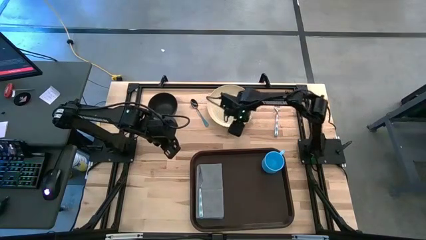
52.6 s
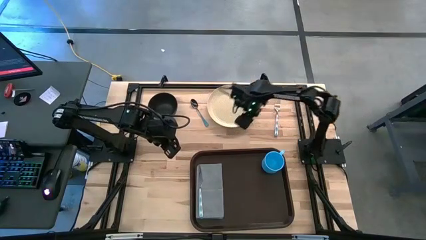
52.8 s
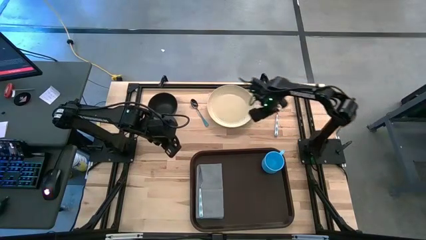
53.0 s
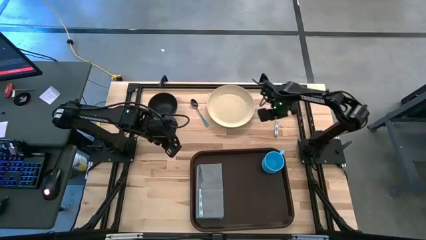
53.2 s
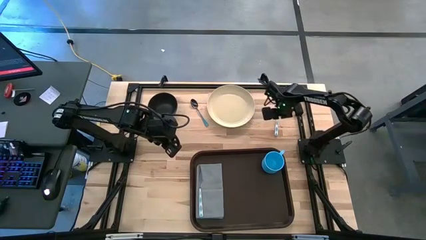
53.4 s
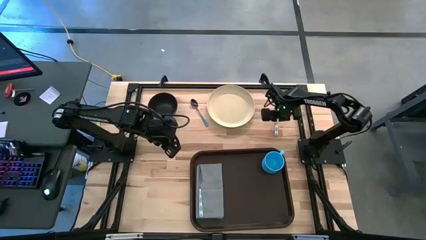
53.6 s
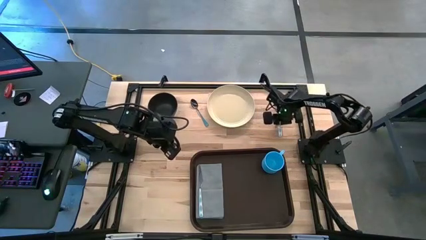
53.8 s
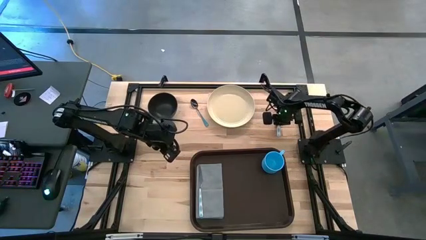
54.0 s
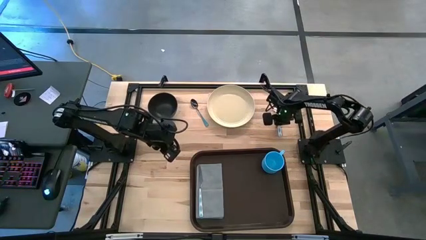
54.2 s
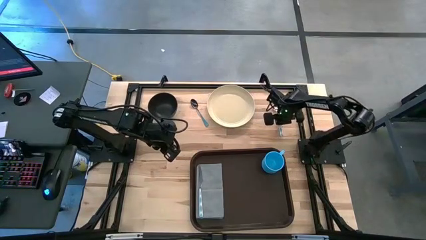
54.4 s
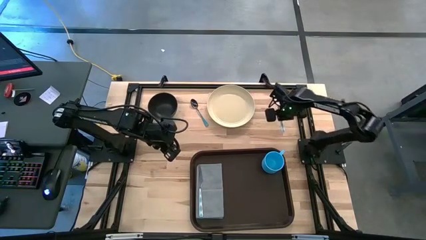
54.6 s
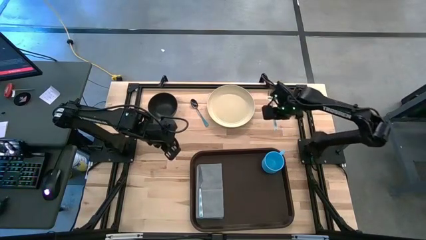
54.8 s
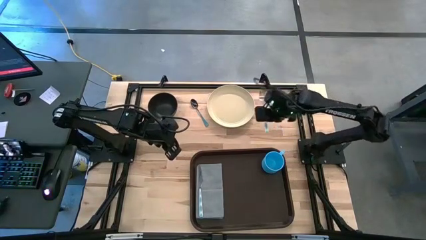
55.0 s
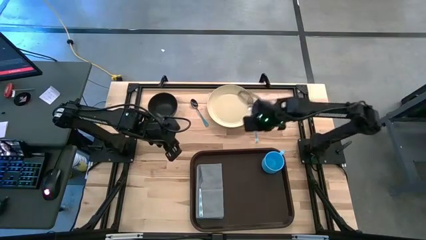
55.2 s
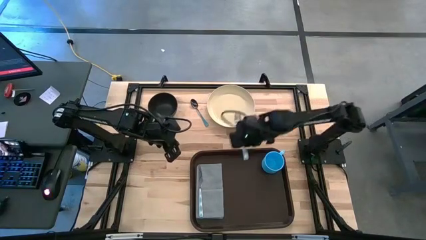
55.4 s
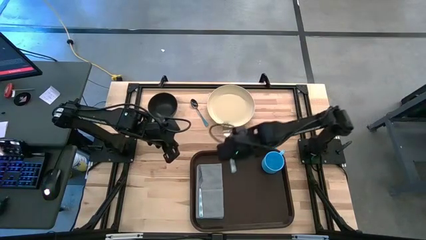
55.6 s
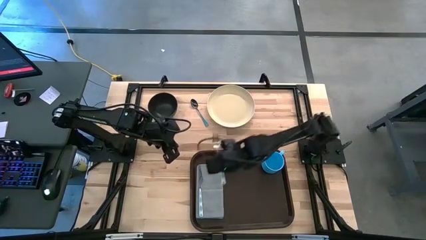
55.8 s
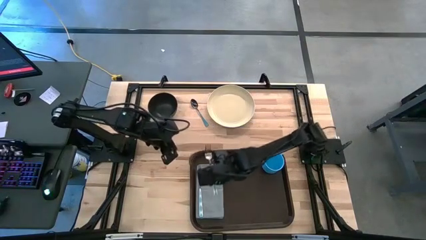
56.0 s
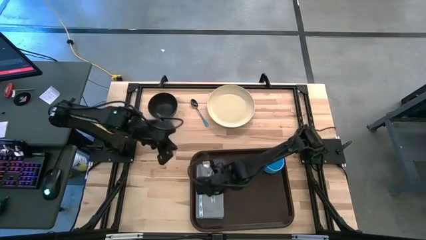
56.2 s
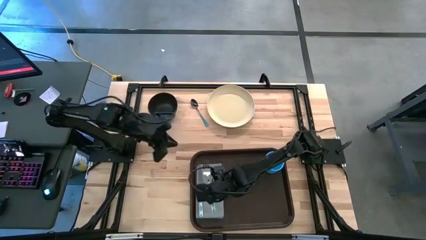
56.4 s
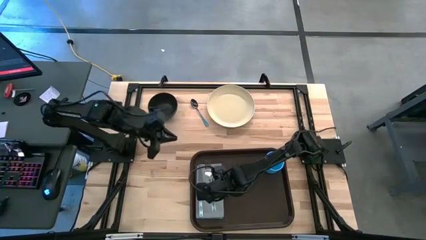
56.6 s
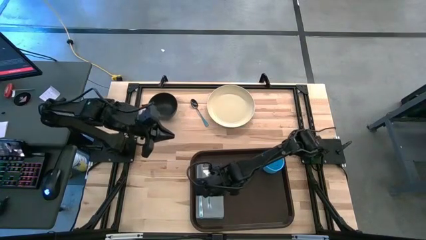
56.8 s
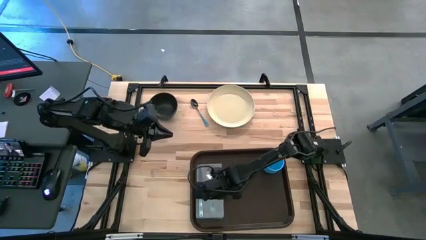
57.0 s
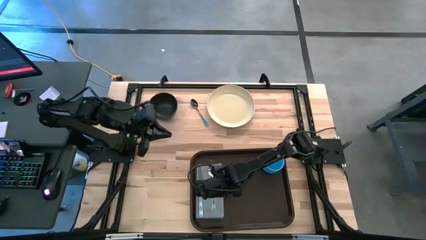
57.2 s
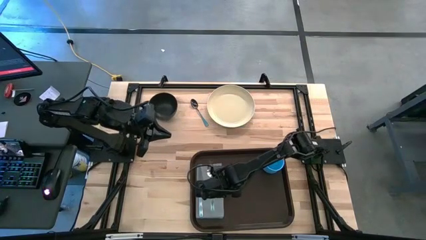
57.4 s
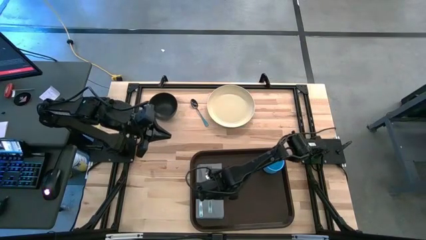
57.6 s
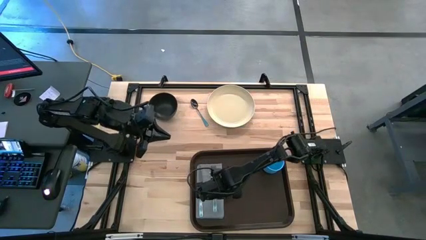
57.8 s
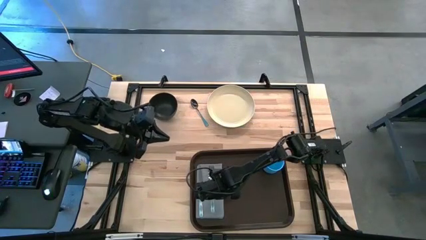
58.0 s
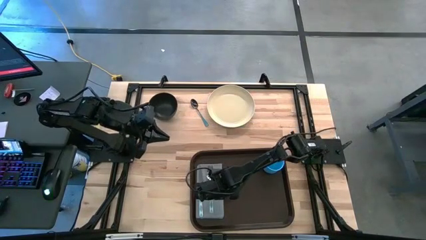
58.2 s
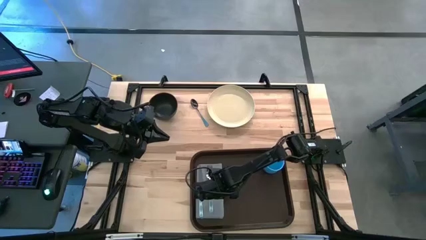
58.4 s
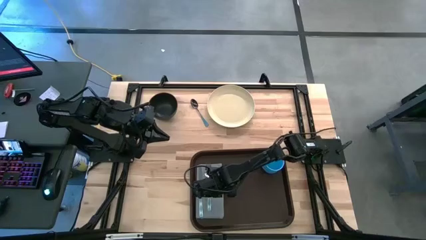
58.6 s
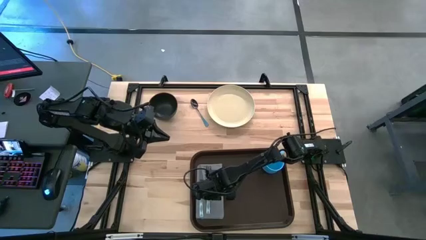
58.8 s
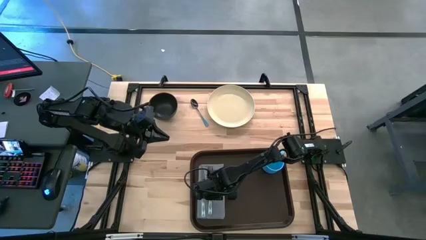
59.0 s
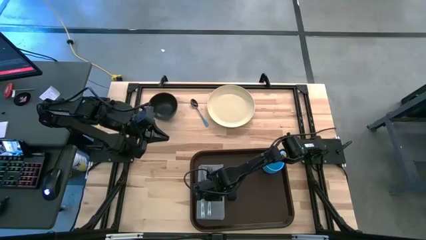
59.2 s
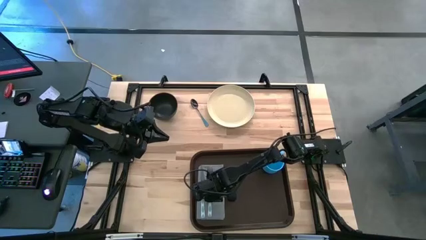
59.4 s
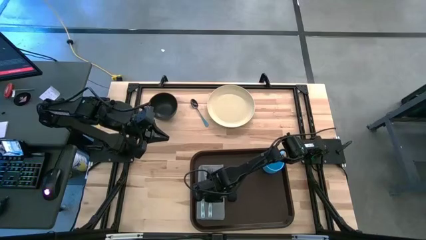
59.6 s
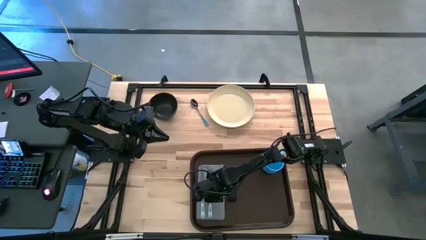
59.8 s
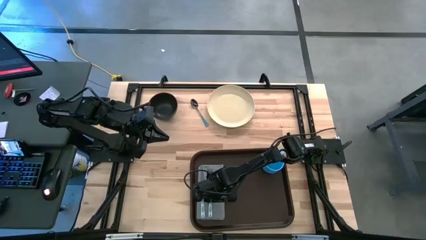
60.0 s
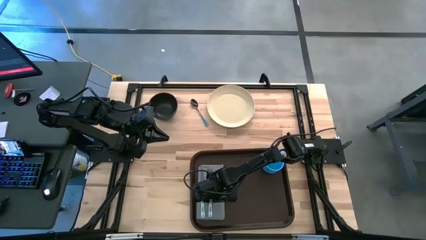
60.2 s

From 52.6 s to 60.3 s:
Task: Set up tray
Put the white fork on the gray table napkin to the right side of the white knife
